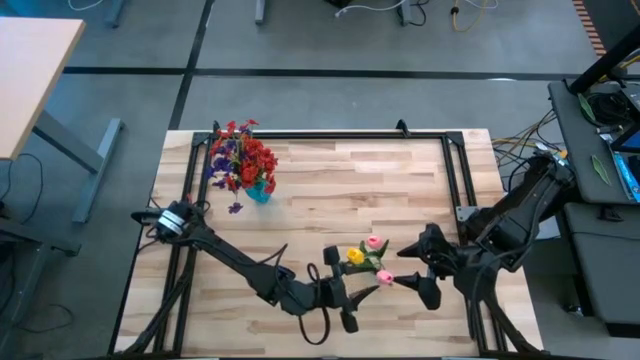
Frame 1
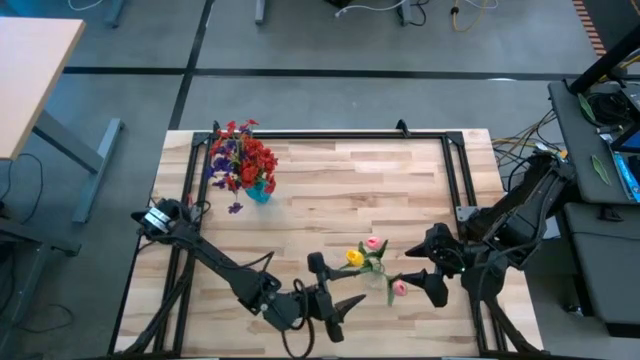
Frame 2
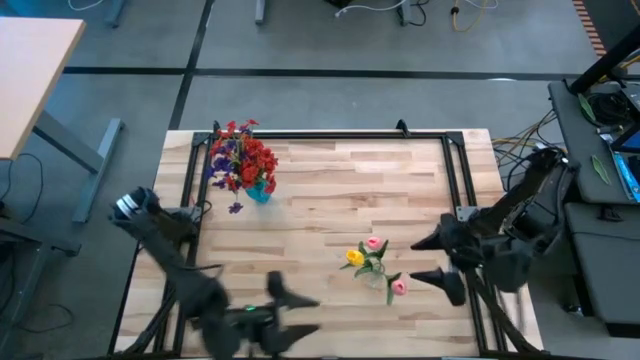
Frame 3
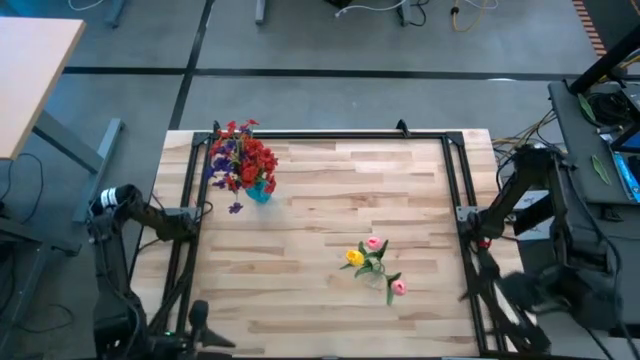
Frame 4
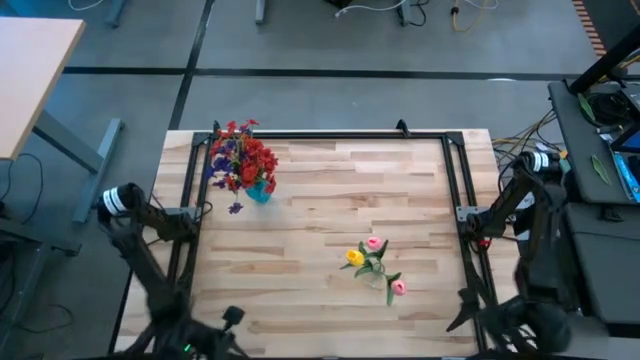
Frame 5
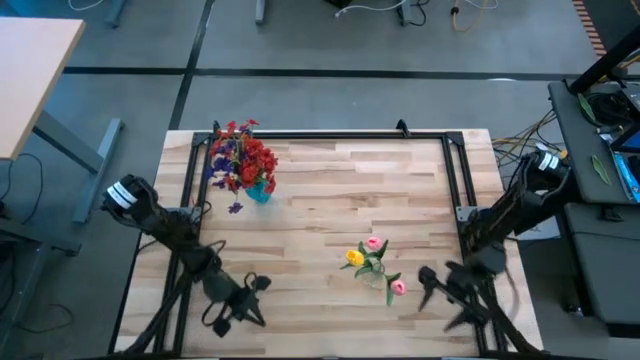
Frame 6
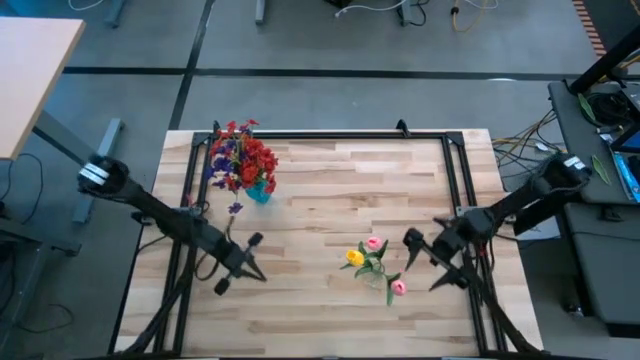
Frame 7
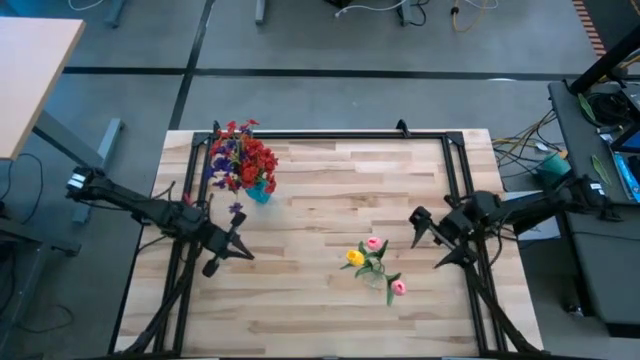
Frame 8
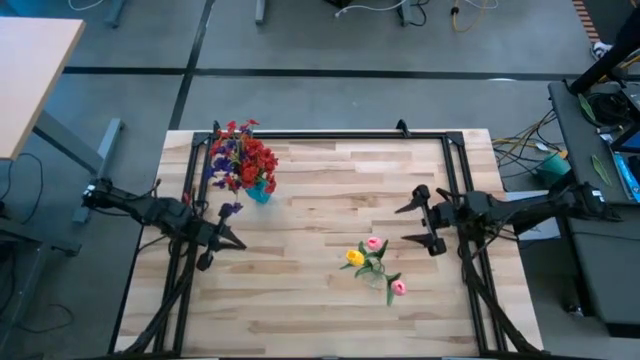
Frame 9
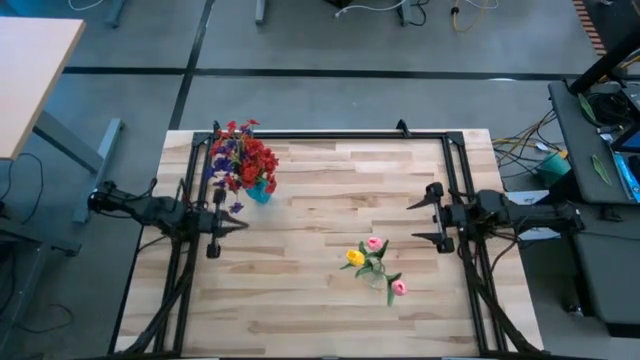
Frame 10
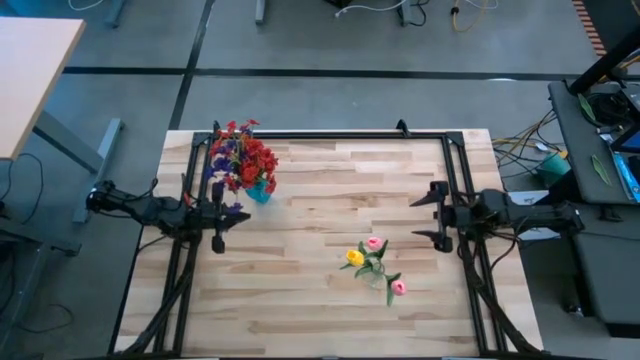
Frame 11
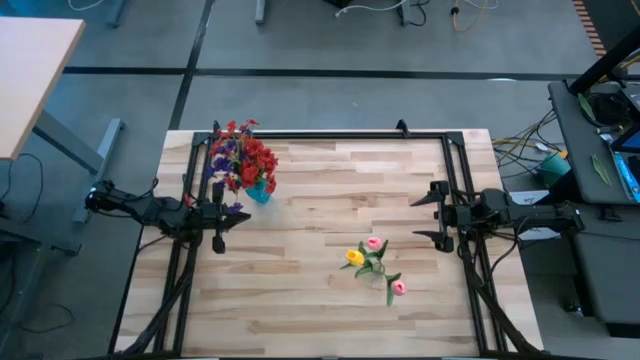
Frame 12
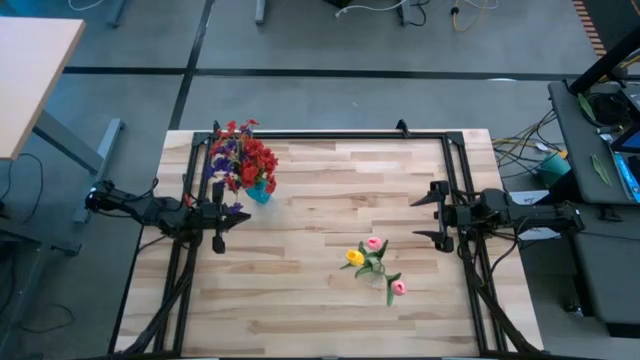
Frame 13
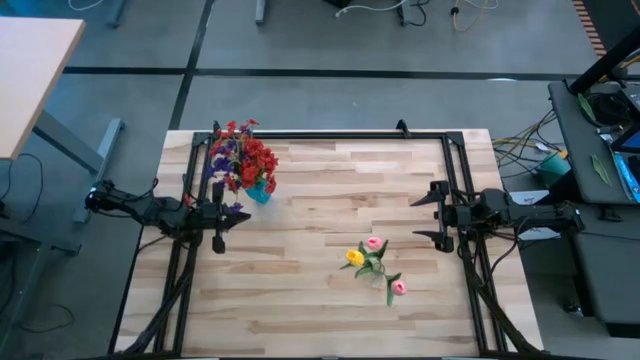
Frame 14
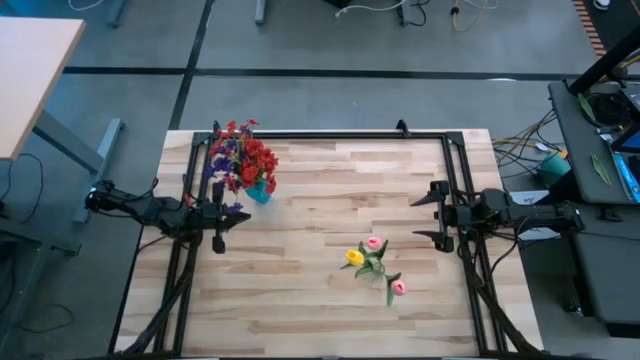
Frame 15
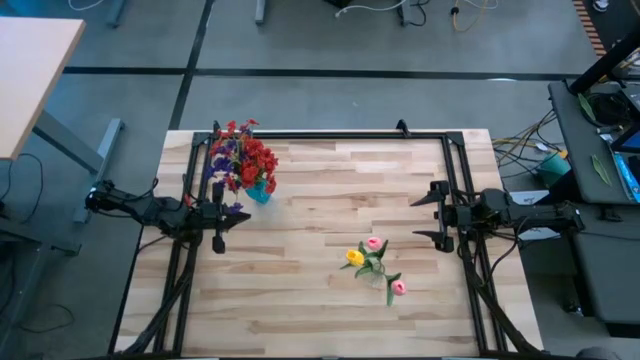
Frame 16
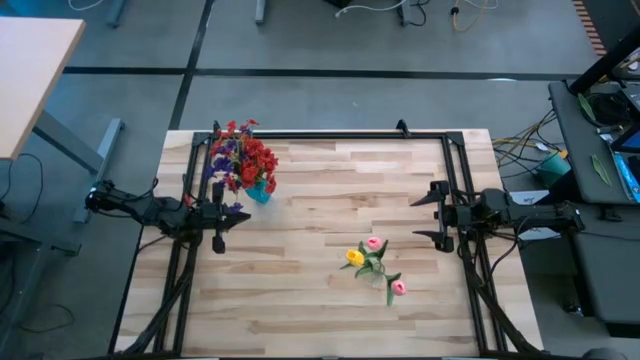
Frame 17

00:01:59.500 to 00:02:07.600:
Task: Sort flowers into vase by color
Return to Home Position

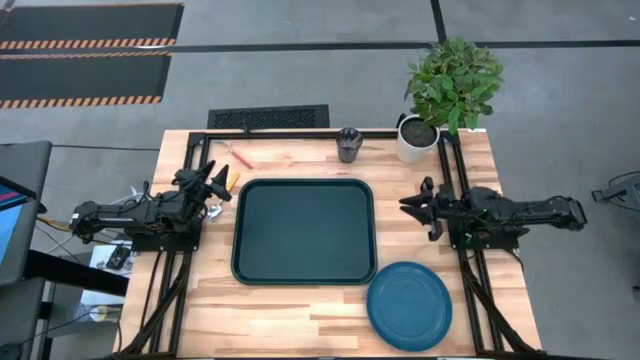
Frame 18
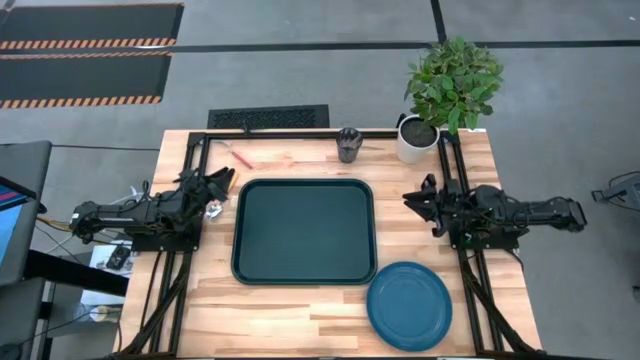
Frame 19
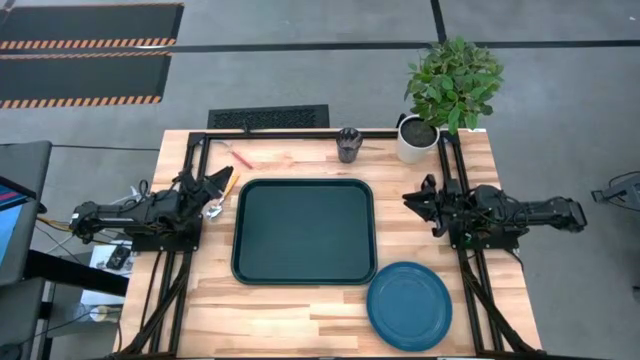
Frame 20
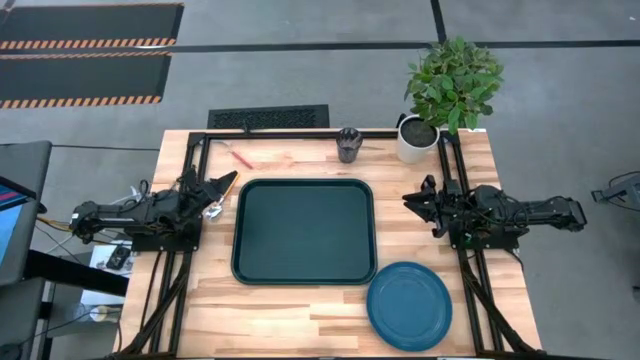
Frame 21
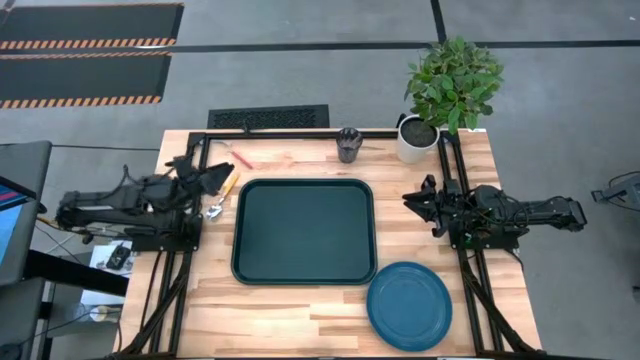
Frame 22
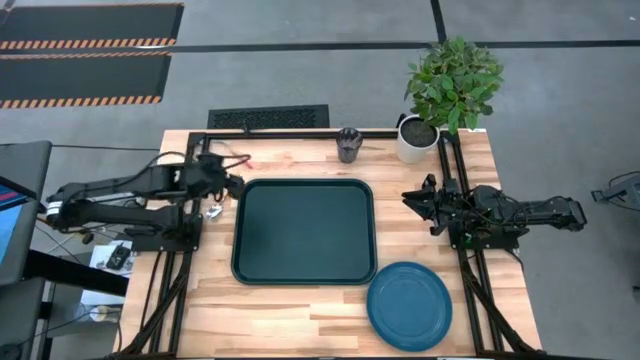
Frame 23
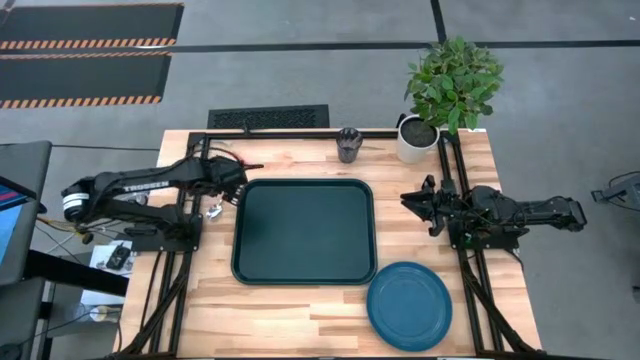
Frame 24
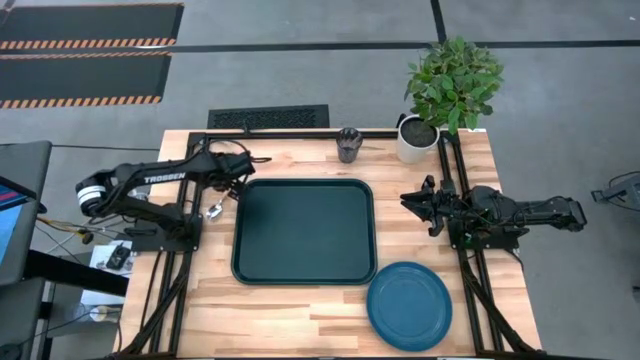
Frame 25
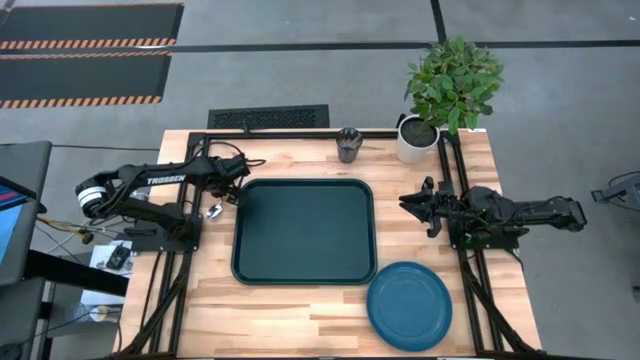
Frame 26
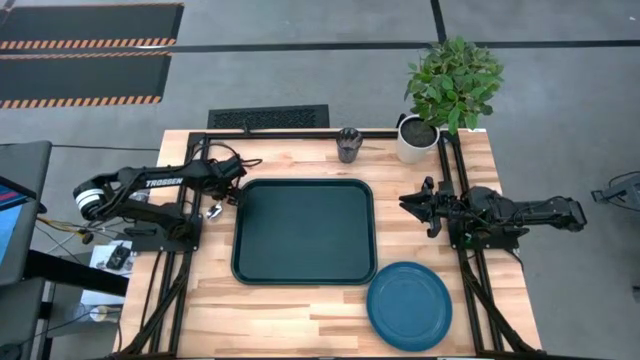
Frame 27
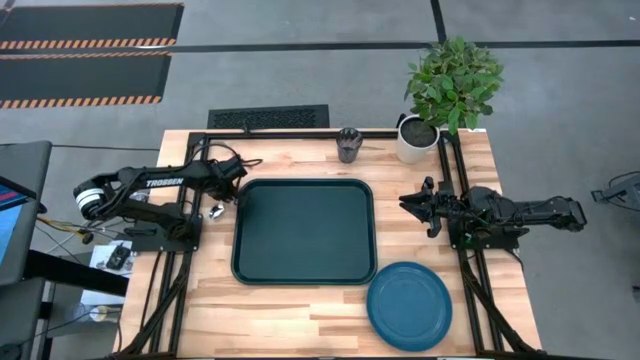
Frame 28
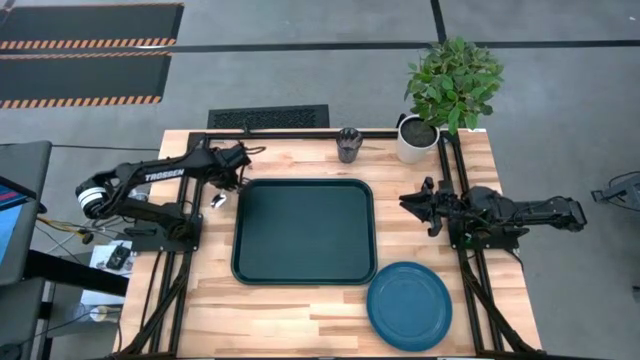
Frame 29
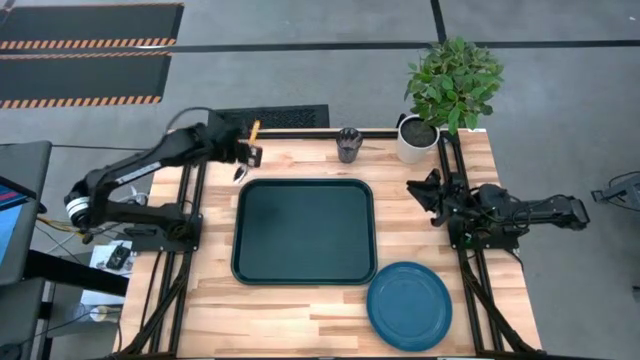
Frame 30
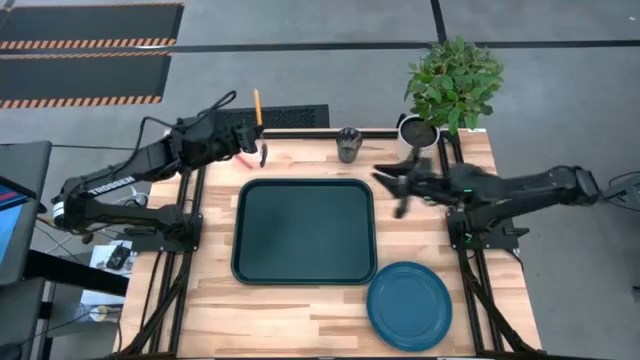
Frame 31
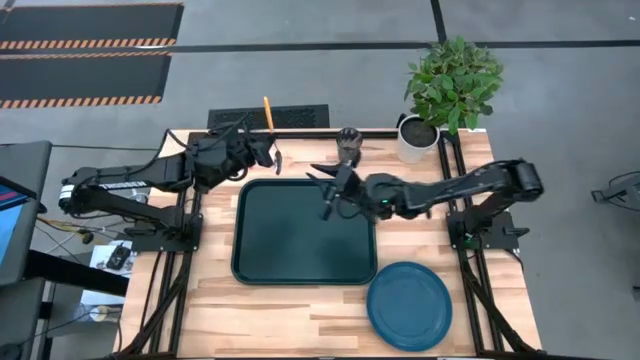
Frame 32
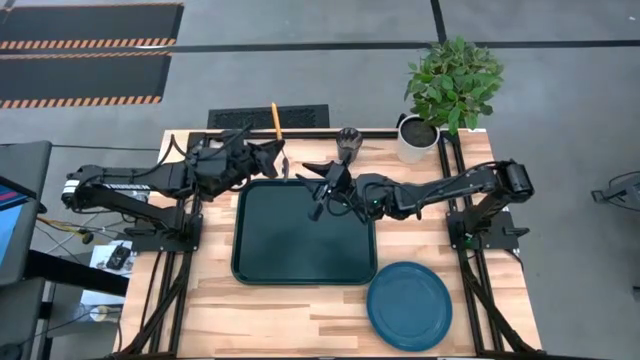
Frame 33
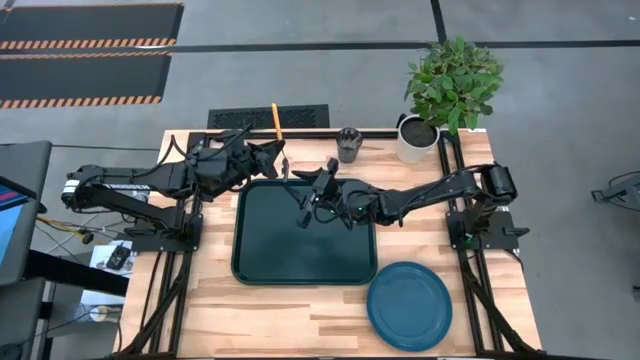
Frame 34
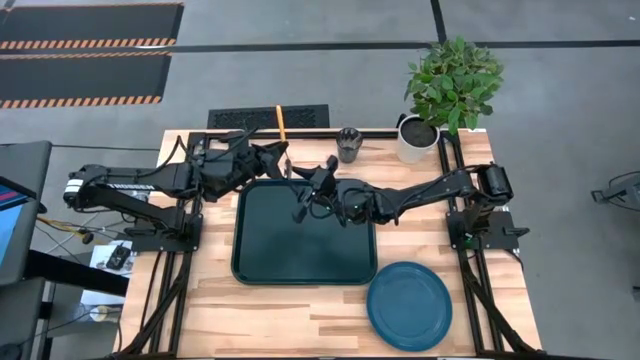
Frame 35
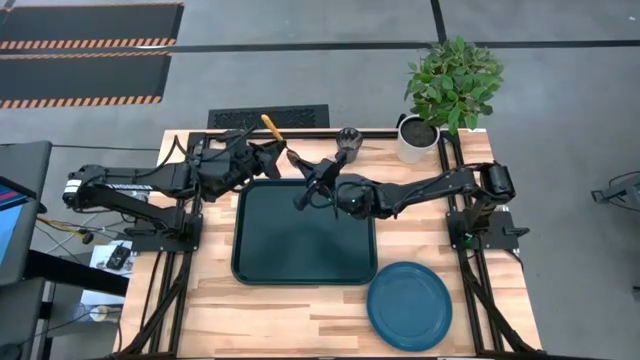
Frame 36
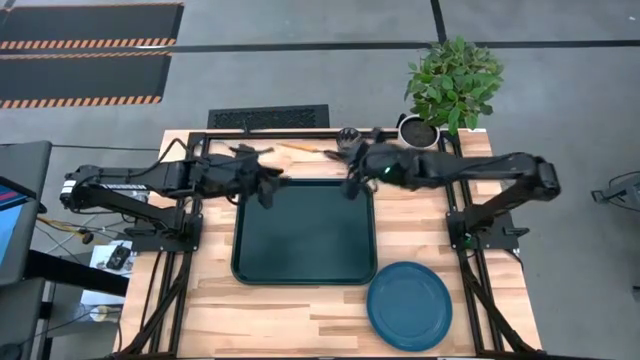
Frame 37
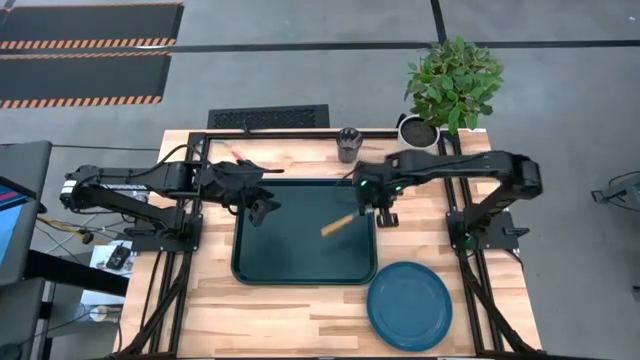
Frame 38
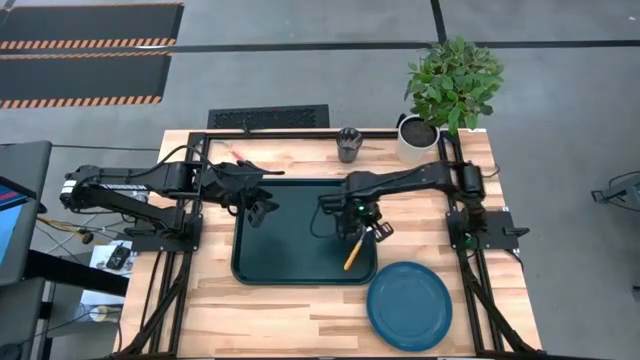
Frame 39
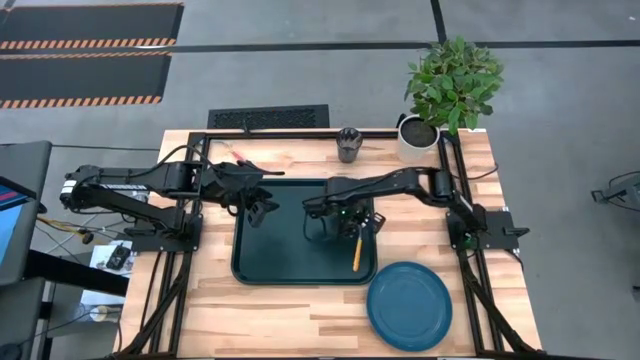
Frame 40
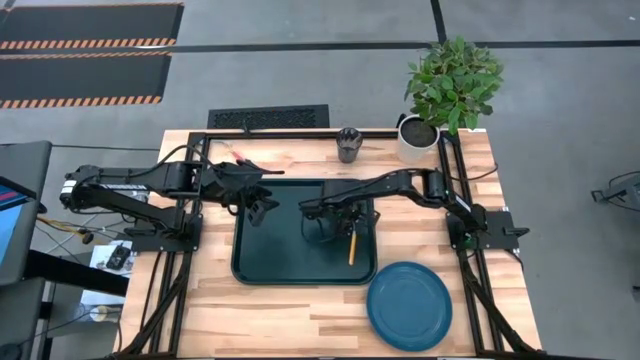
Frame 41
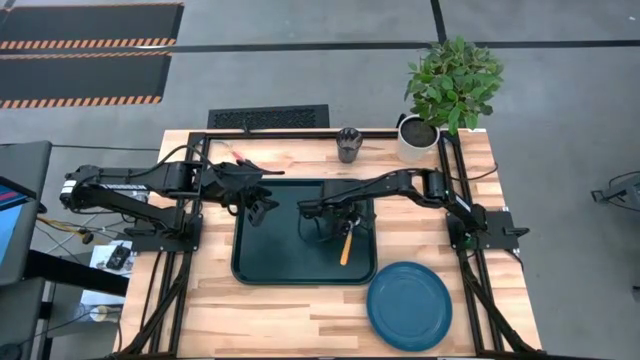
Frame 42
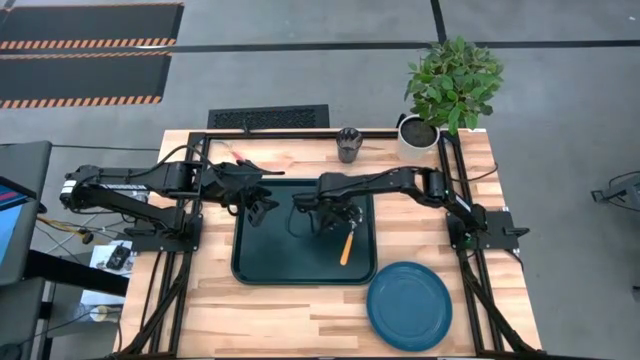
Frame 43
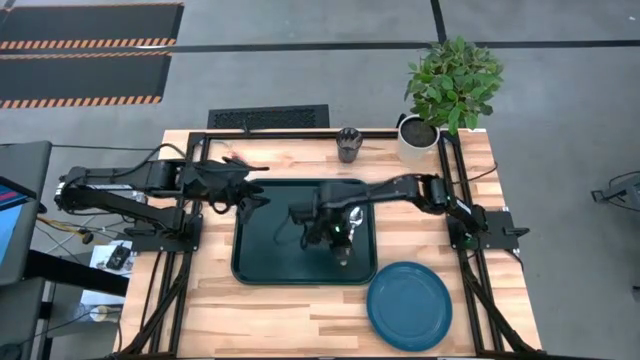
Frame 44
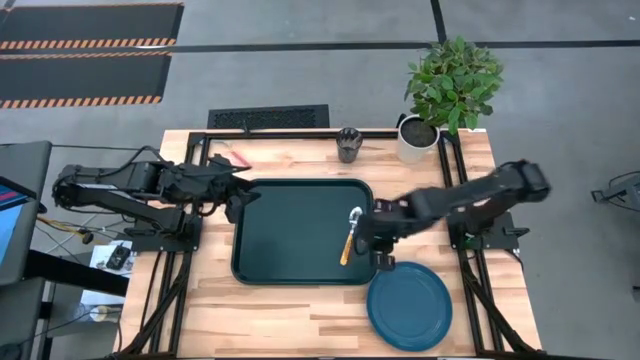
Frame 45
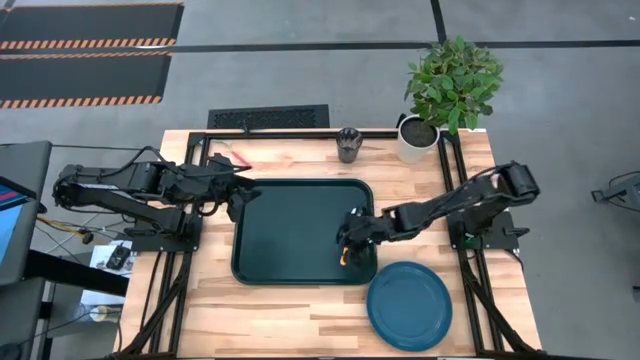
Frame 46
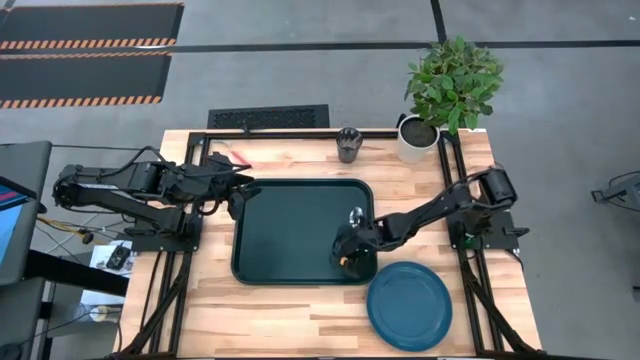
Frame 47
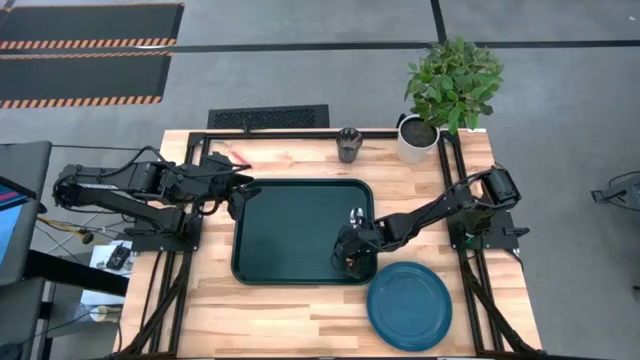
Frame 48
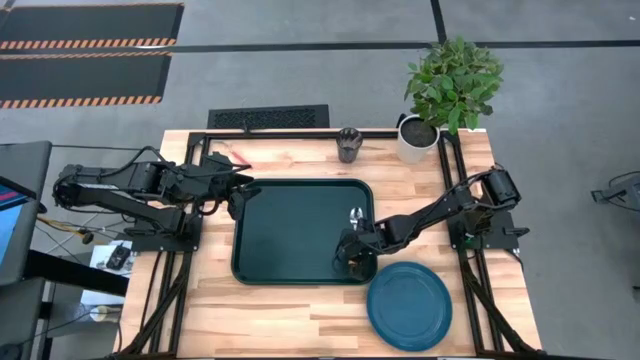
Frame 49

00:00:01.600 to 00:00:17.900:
Task: Pick and place plate/cup/fork/spoon on tray
Put the yellow spoon on the black serving tray
